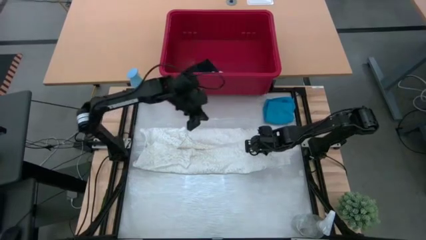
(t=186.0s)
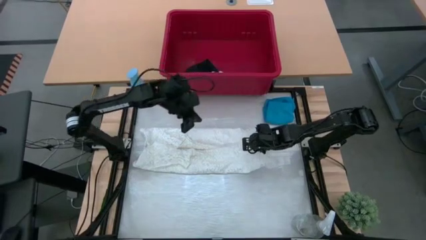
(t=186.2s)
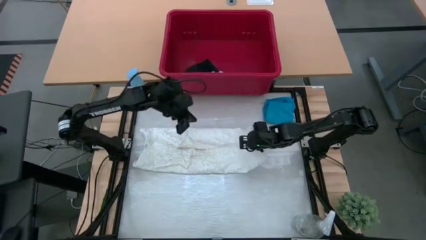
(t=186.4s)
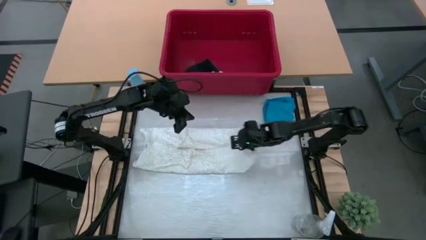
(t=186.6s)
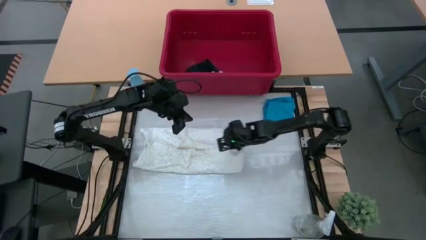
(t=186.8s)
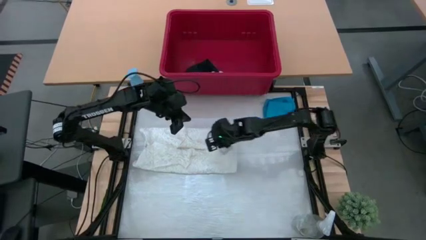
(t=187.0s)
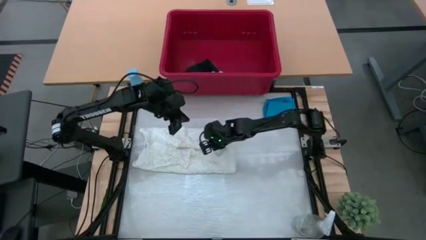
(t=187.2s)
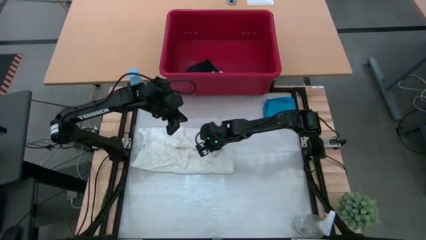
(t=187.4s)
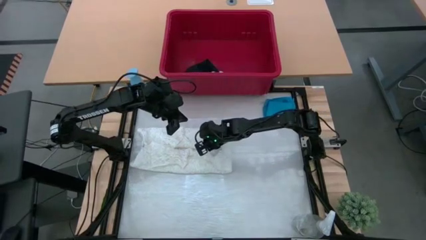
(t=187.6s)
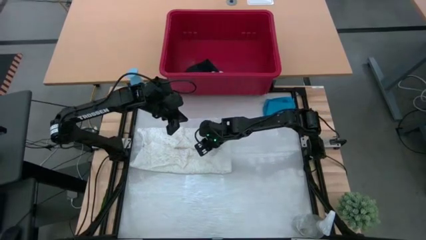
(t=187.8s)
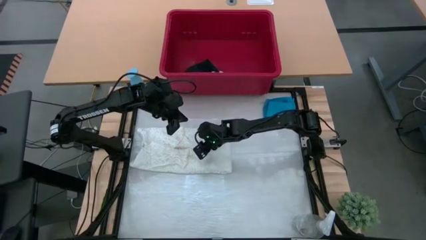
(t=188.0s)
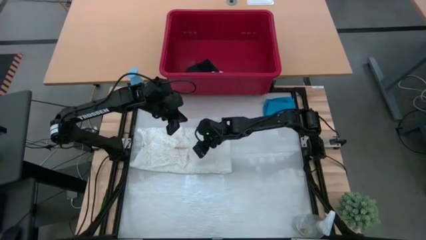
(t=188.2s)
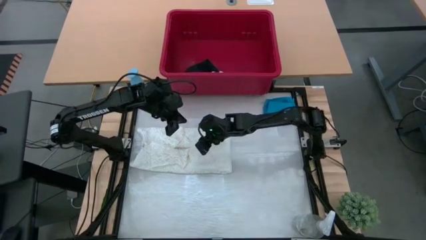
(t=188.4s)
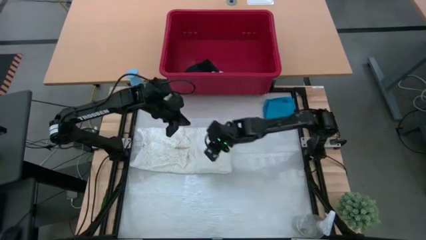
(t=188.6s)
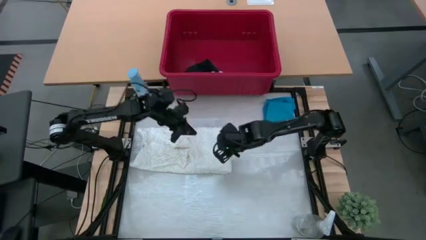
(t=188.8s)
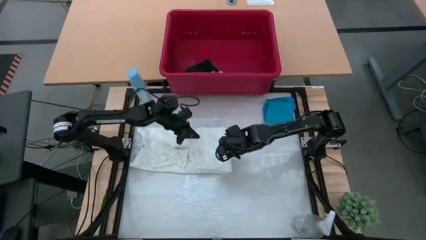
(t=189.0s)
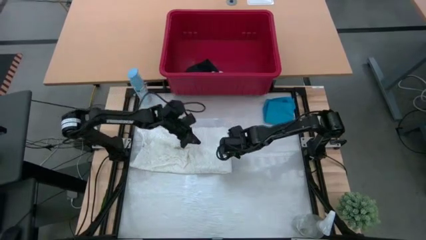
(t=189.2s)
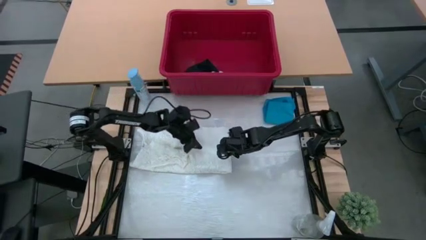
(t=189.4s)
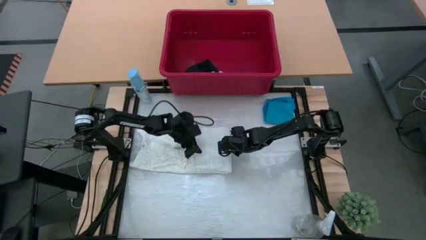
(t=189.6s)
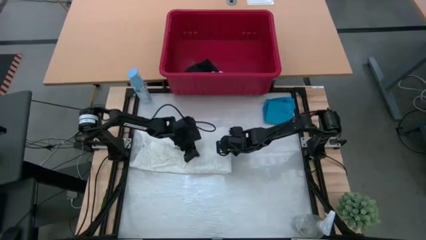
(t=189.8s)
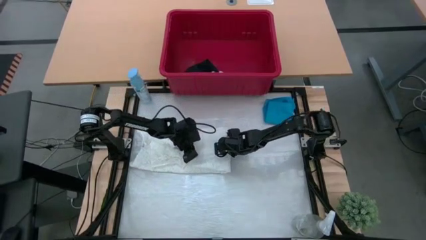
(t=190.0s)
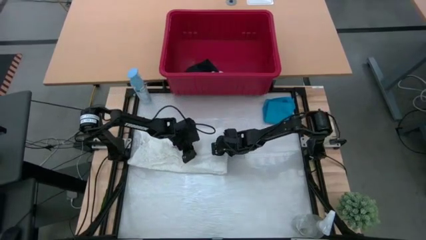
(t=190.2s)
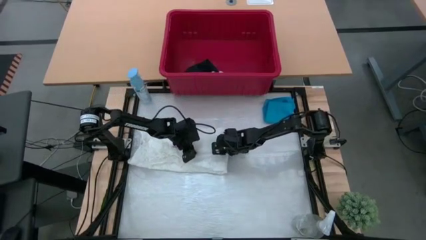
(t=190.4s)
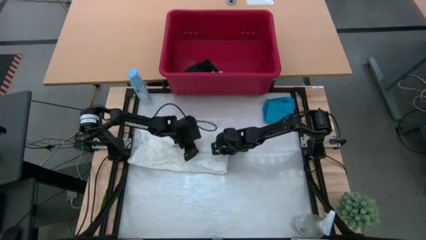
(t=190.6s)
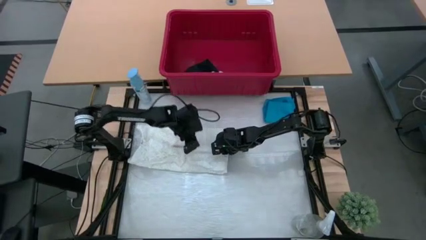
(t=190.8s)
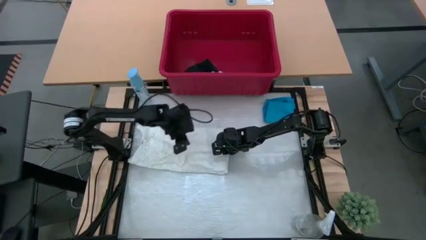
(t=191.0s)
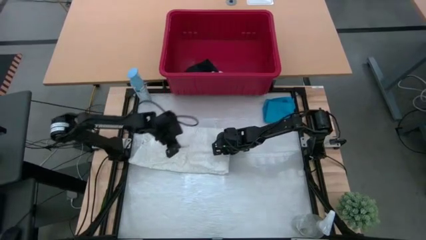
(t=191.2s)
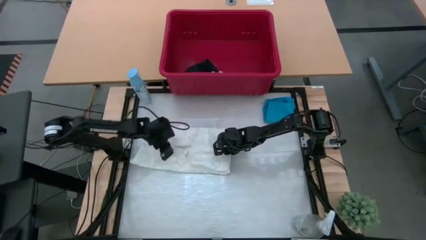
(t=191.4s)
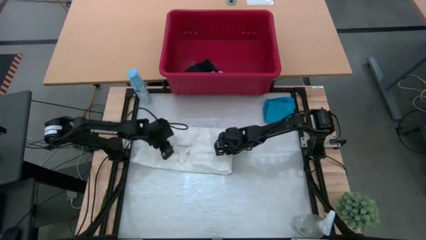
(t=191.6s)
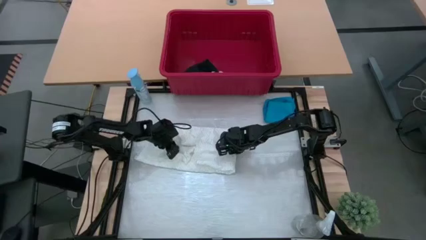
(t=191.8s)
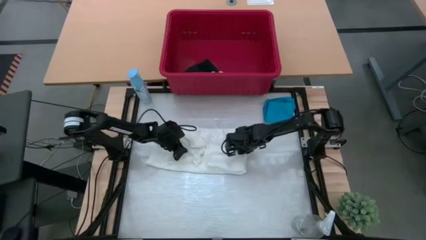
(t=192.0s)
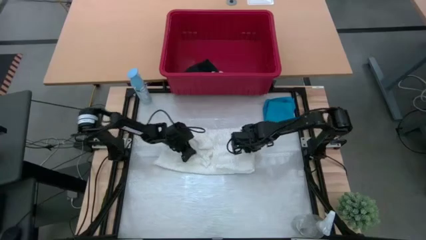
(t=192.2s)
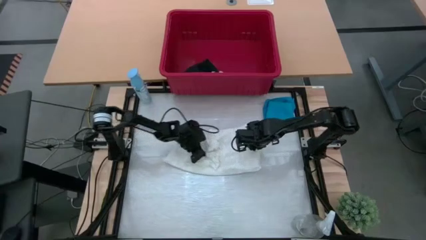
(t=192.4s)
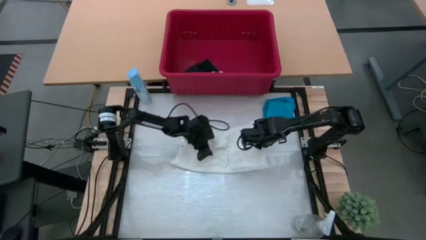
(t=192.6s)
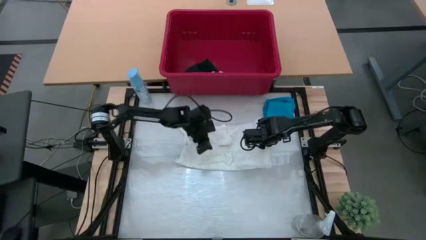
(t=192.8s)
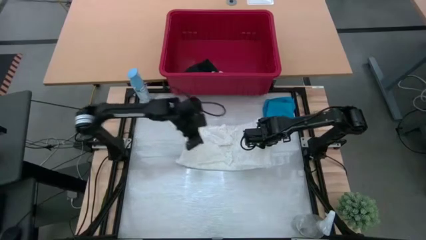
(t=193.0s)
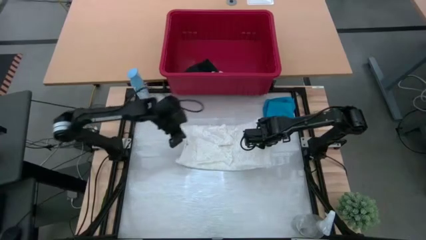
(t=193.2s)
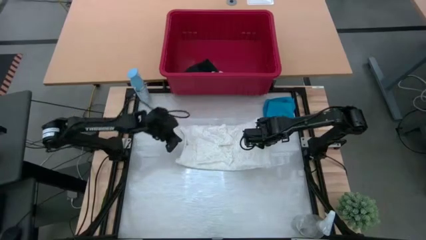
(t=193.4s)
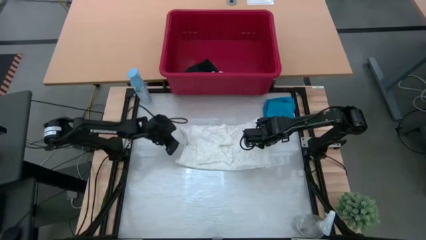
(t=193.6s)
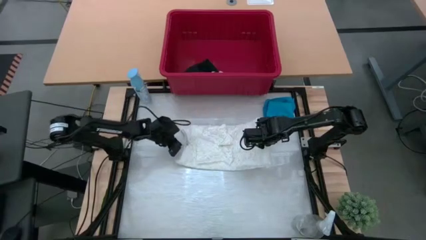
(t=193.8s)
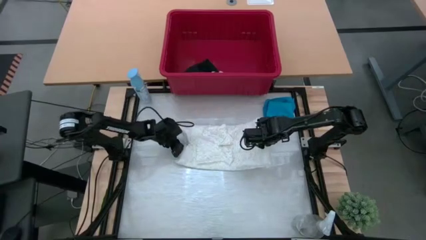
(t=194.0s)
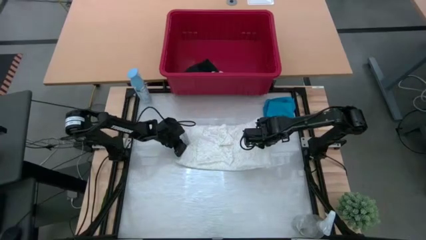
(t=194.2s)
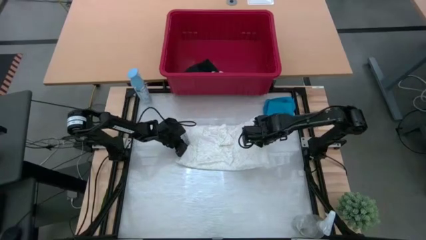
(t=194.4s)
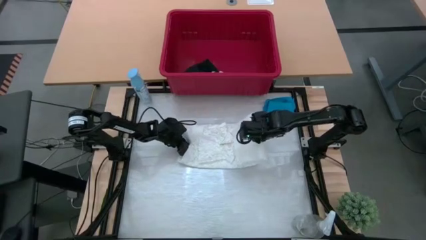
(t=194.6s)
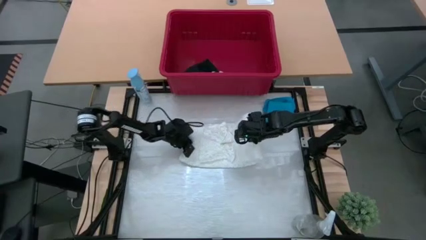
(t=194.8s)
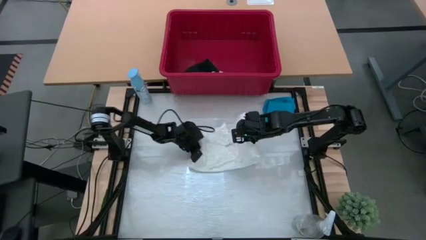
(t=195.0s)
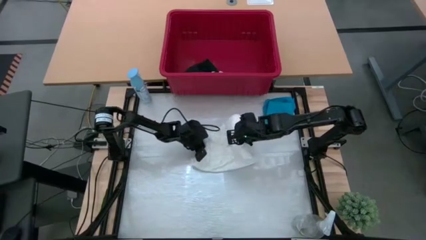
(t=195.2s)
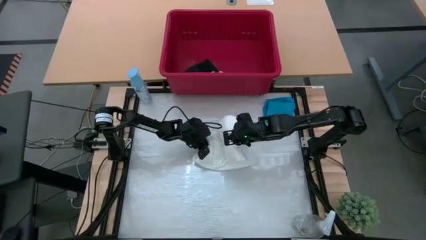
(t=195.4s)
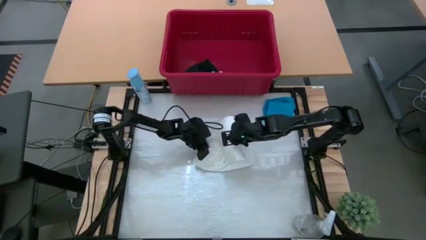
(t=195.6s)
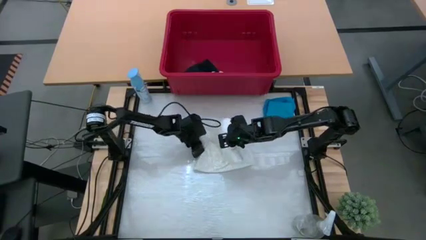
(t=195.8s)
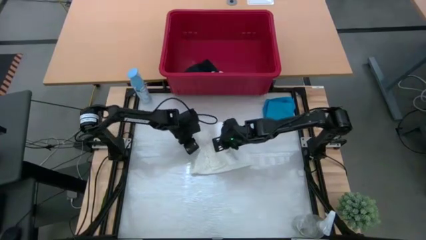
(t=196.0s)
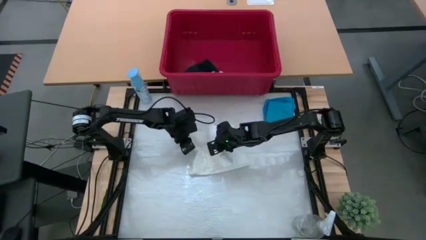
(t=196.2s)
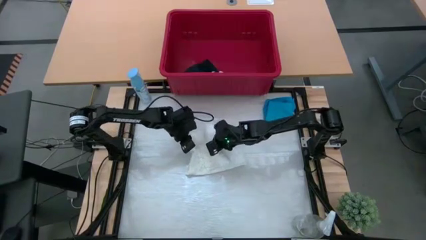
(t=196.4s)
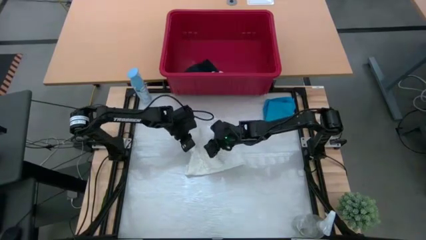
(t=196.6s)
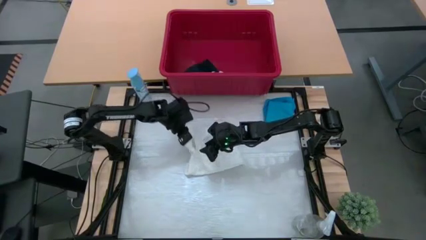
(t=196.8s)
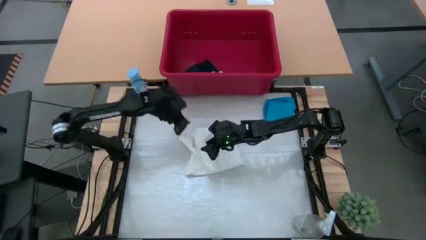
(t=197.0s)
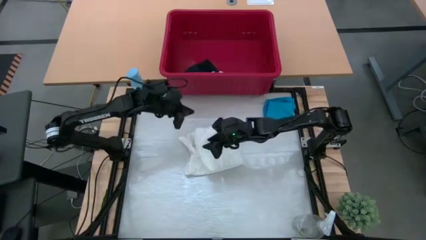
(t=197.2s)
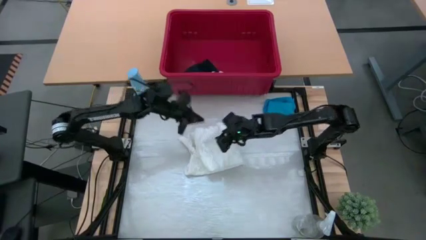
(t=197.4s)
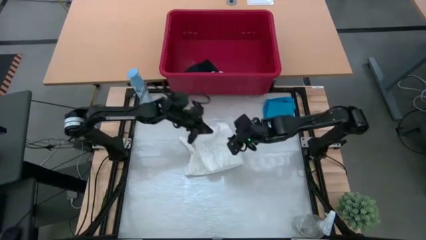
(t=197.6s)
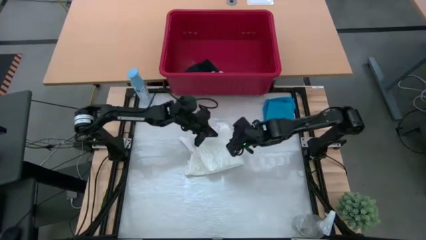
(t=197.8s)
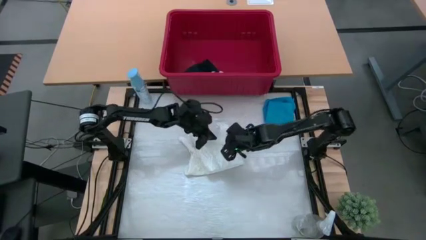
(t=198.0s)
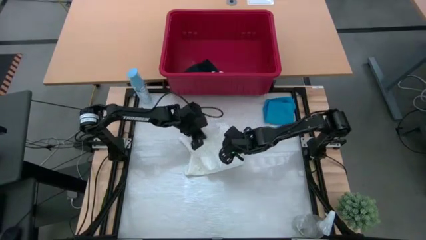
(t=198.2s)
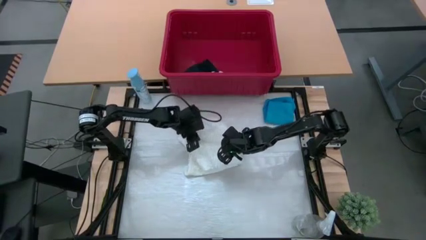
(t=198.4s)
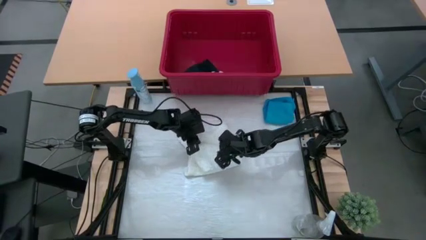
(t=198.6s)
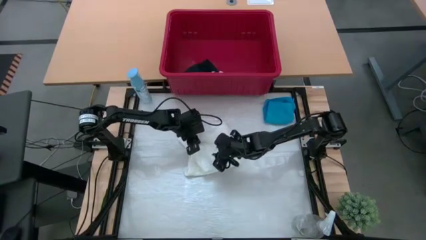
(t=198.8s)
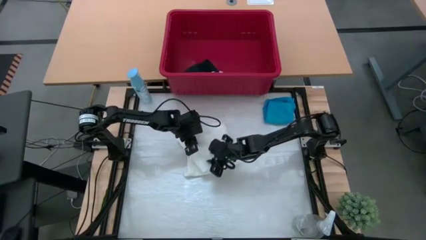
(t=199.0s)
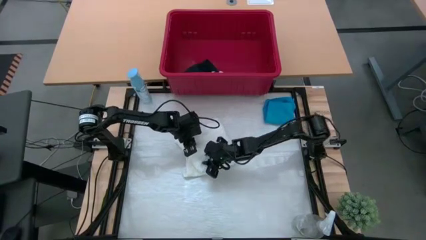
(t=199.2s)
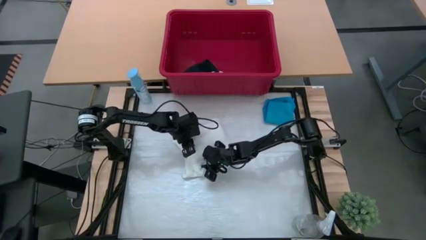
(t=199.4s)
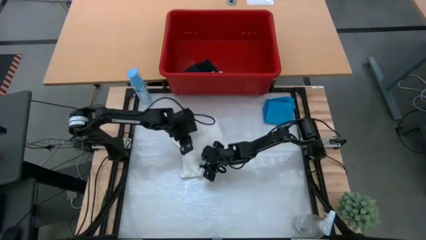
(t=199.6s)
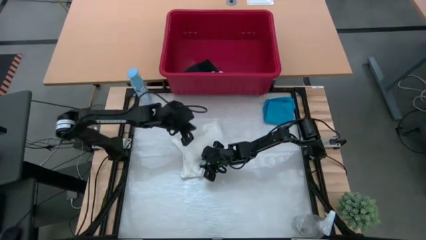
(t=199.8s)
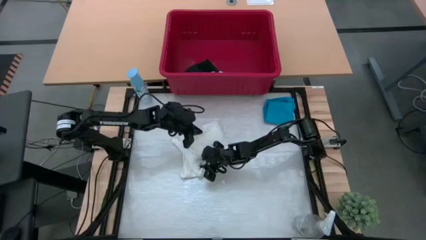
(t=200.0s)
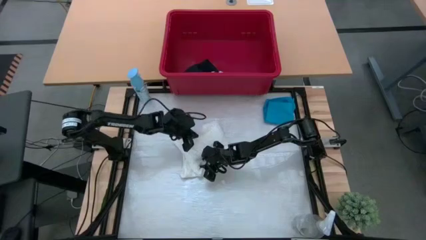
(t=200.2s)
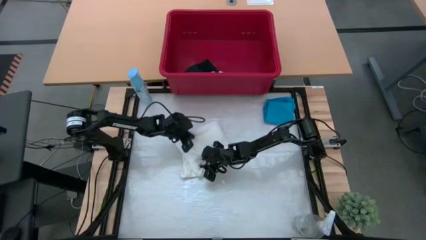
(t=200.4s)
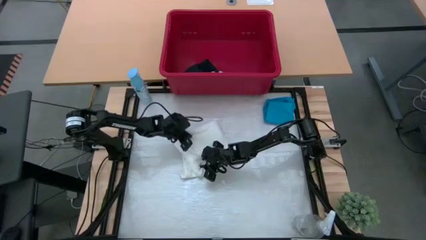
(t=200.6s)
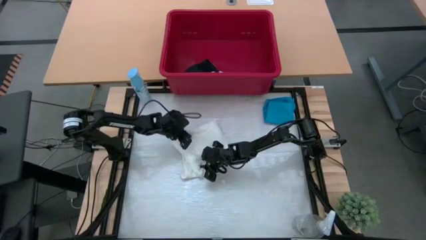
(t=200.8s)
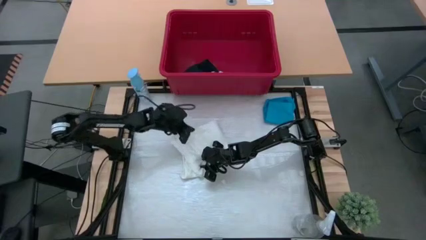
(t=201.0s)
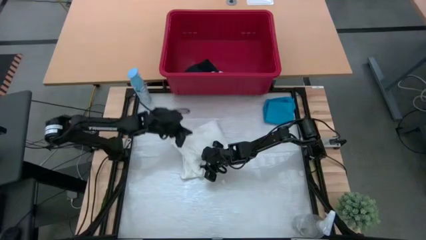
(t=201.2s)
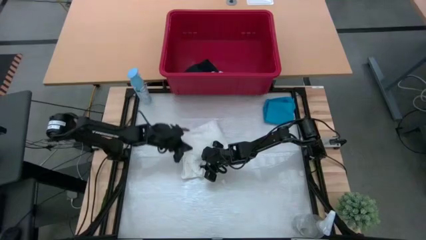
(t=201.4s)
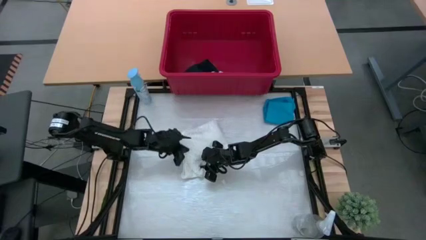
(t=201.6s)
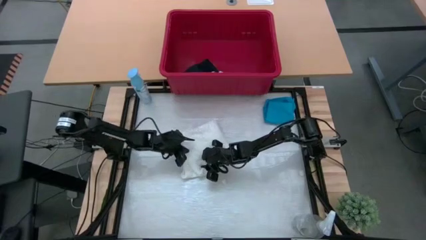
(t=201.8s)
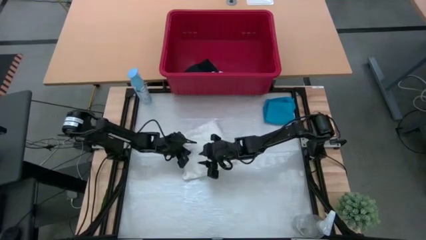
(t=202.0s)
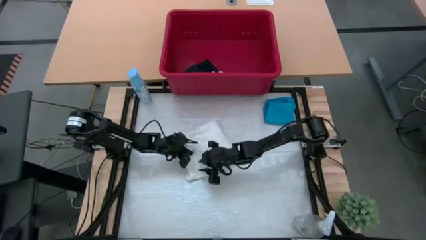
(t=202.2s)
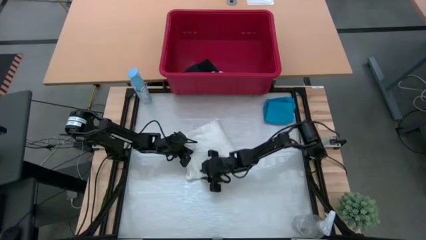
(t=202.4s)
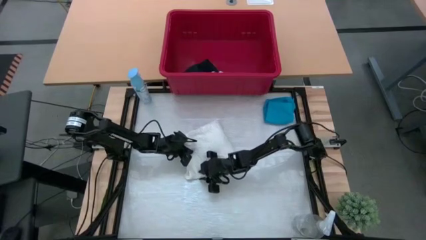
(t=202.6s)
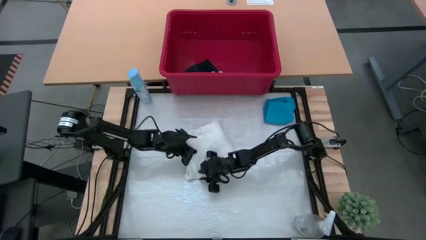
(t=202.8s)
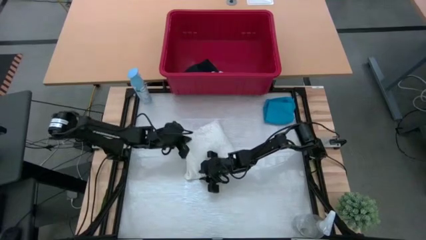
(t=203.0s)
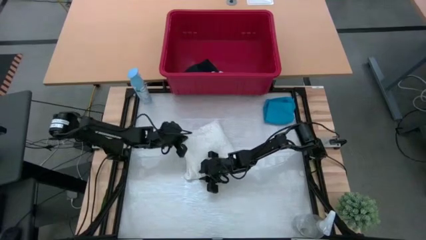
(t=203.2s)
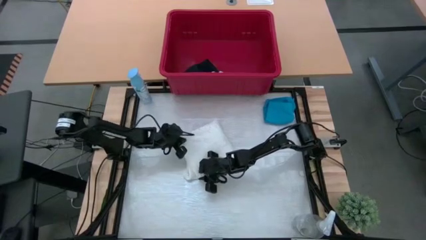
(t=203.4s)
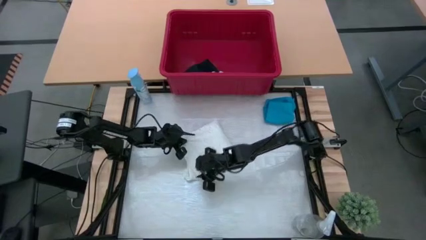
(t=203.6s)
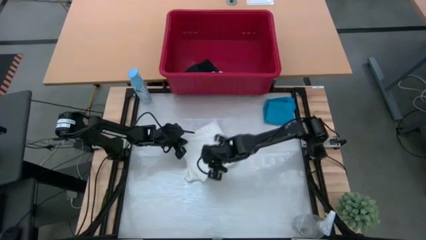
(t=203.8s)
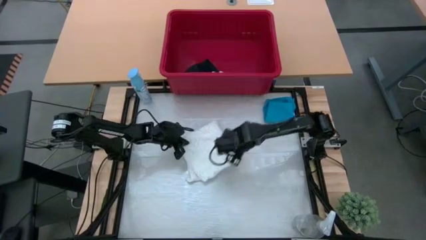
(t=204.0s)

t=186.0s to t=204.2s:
Task: Fold laundry
Fold the white blouse
